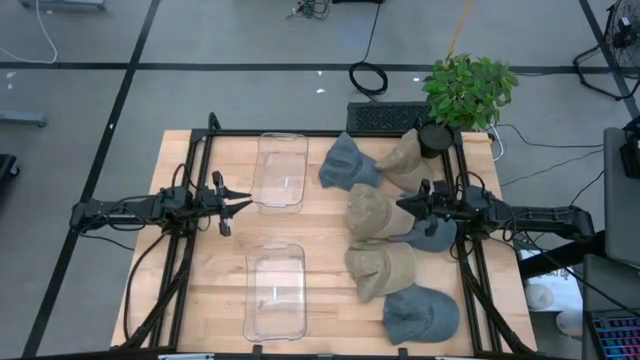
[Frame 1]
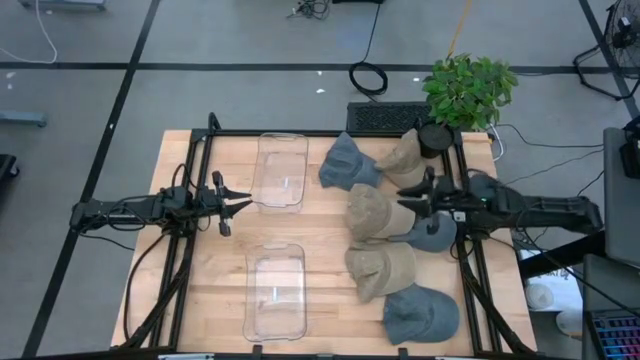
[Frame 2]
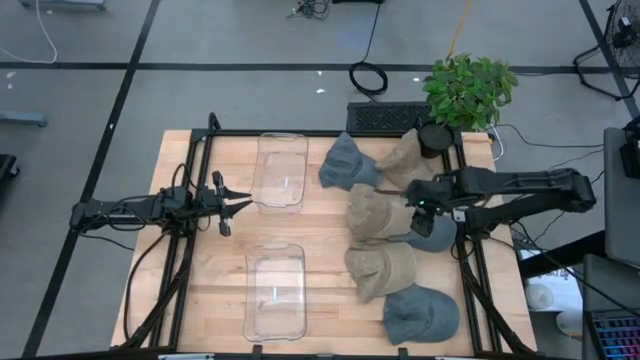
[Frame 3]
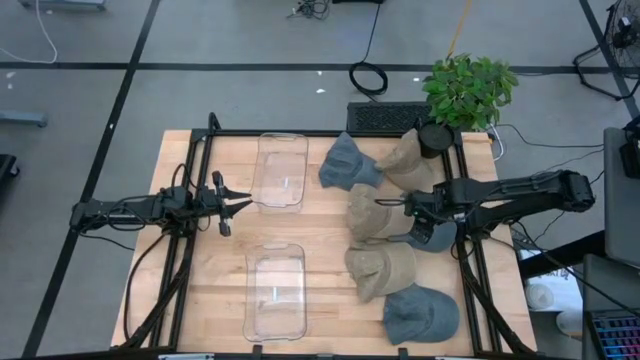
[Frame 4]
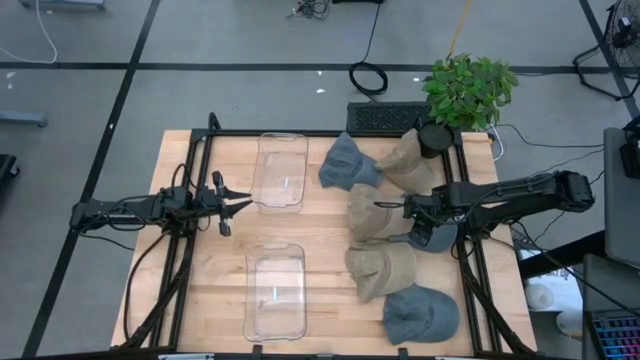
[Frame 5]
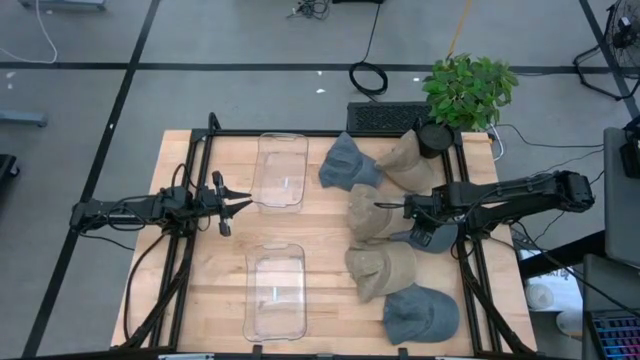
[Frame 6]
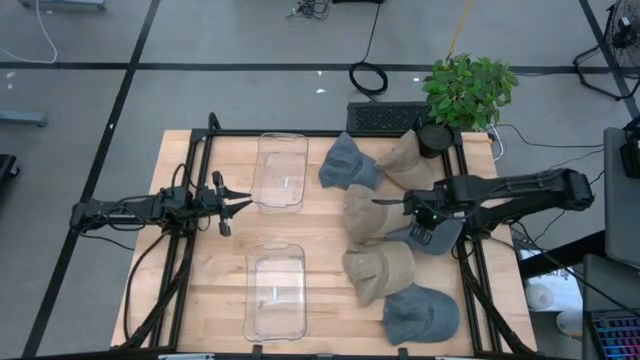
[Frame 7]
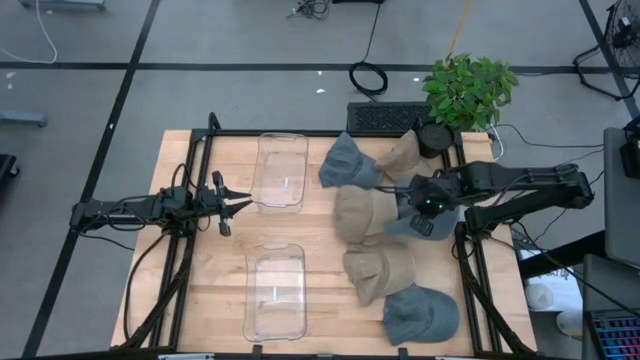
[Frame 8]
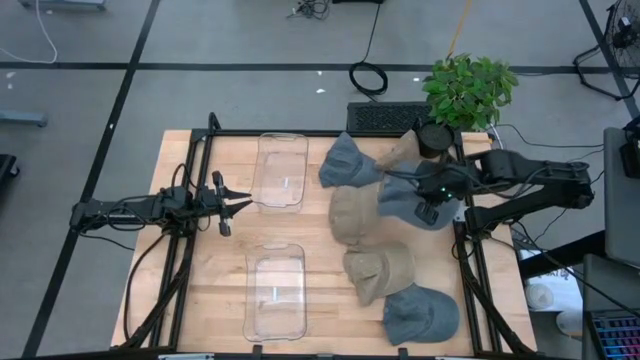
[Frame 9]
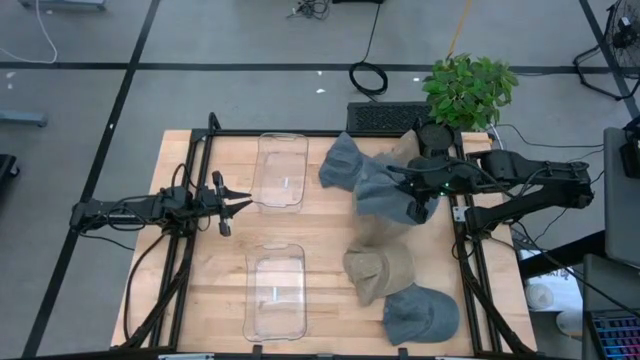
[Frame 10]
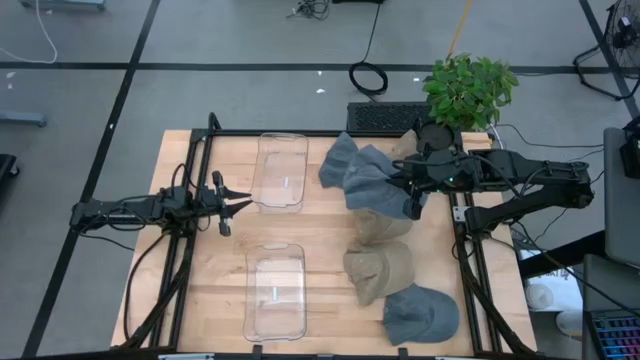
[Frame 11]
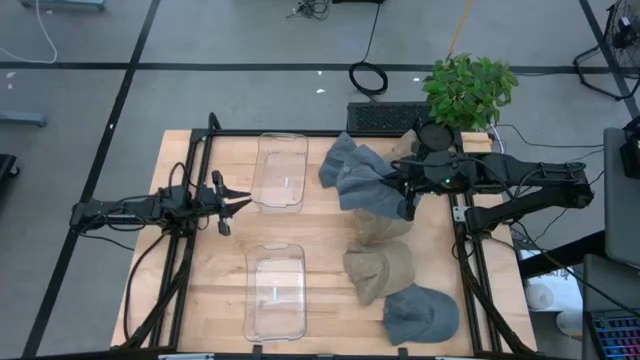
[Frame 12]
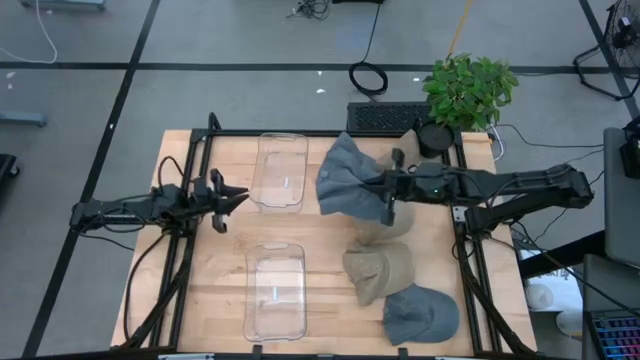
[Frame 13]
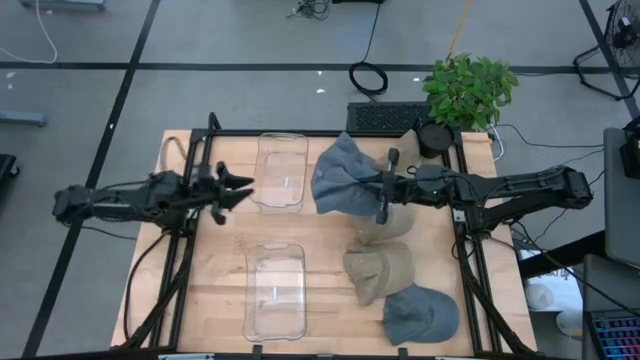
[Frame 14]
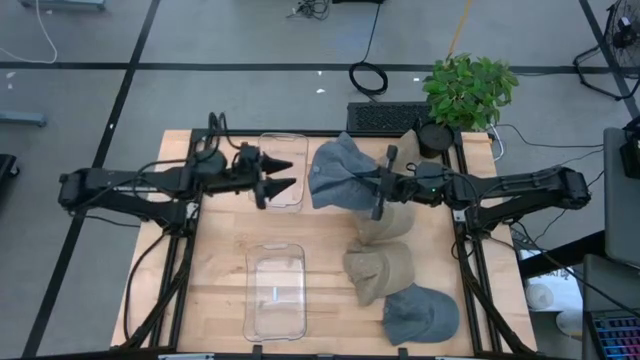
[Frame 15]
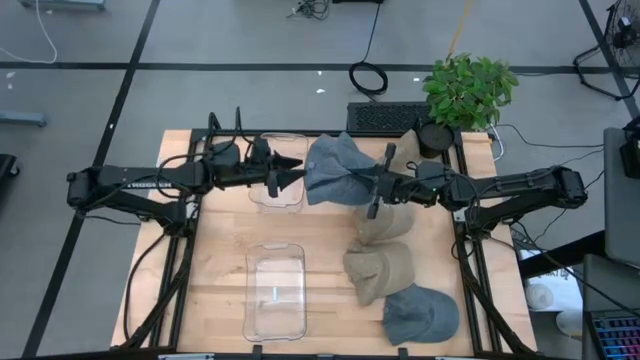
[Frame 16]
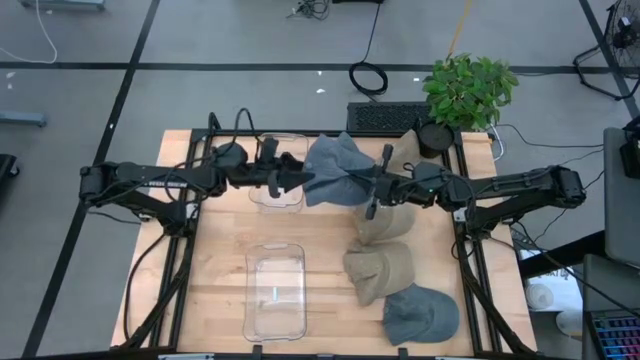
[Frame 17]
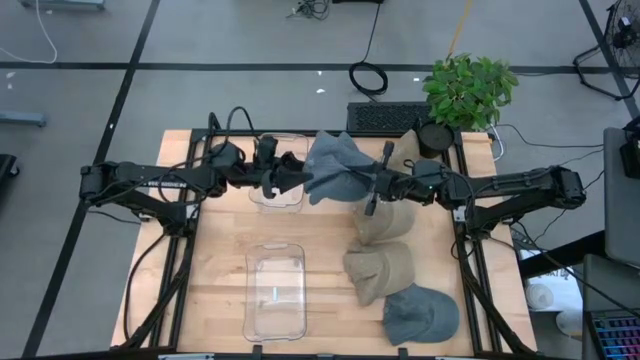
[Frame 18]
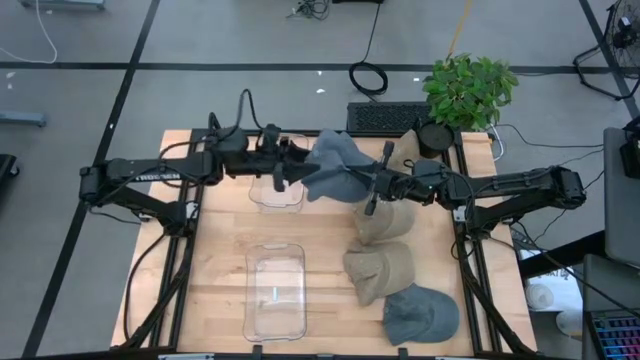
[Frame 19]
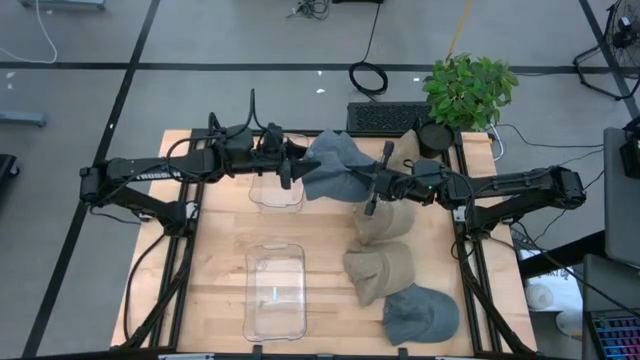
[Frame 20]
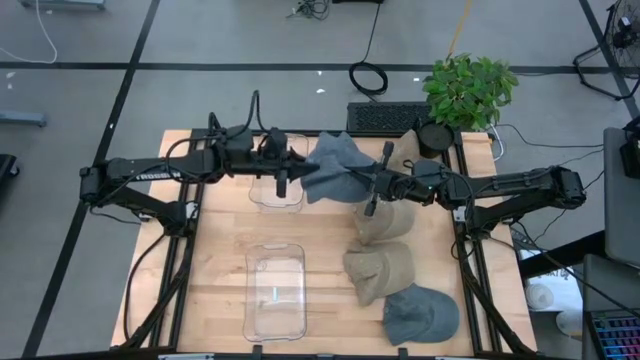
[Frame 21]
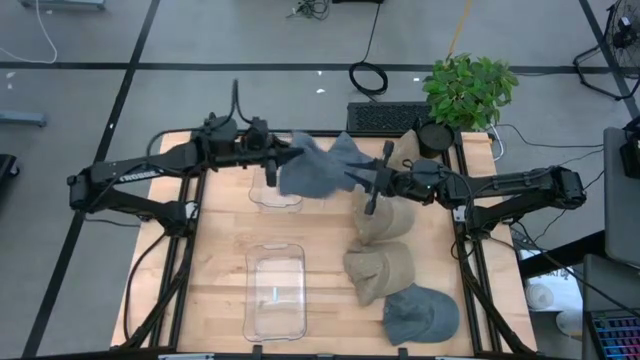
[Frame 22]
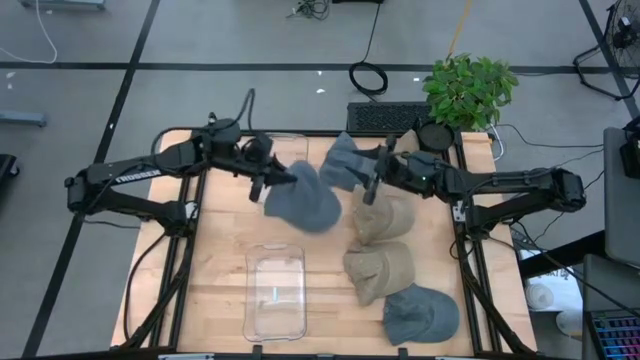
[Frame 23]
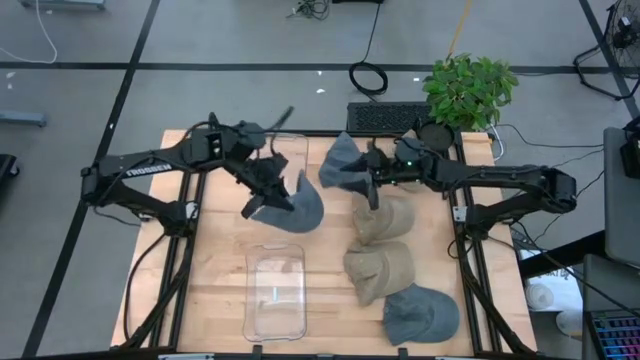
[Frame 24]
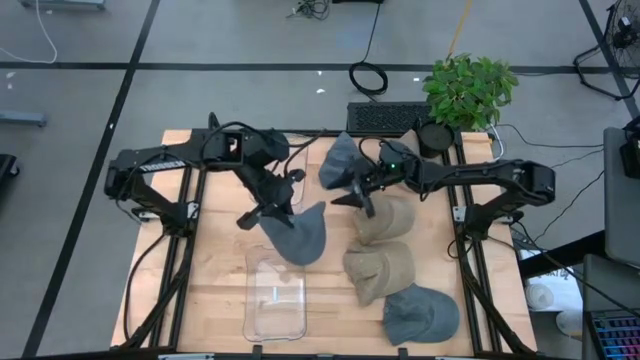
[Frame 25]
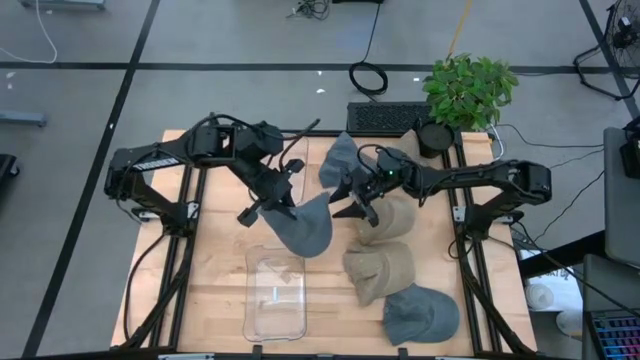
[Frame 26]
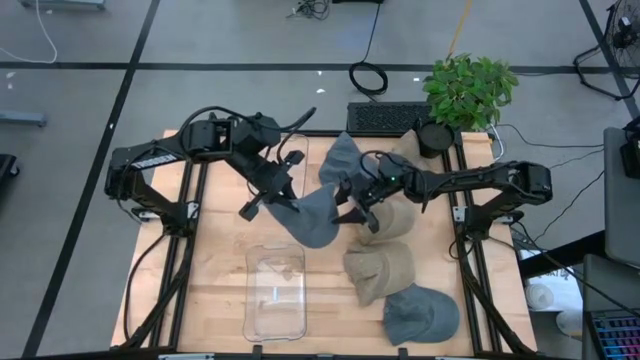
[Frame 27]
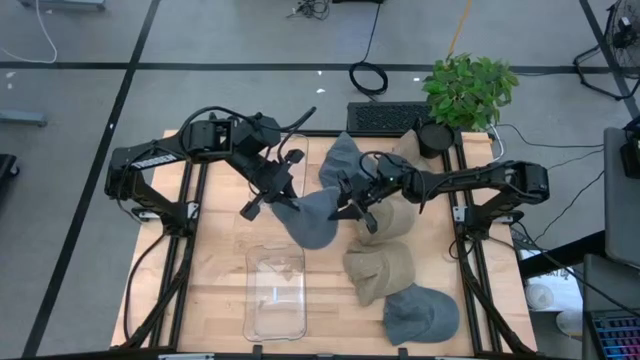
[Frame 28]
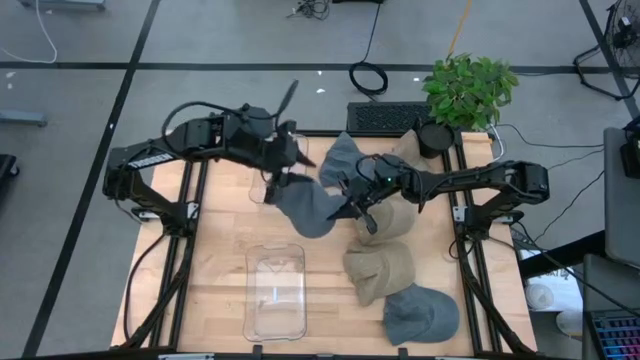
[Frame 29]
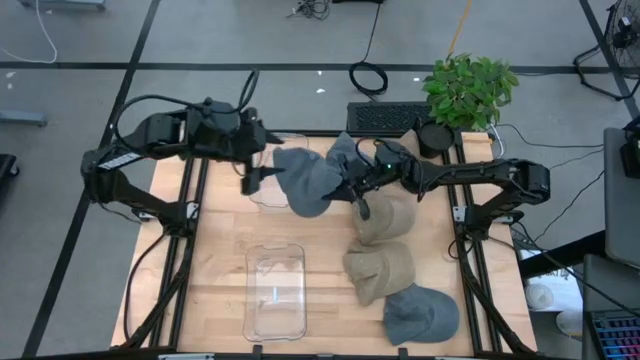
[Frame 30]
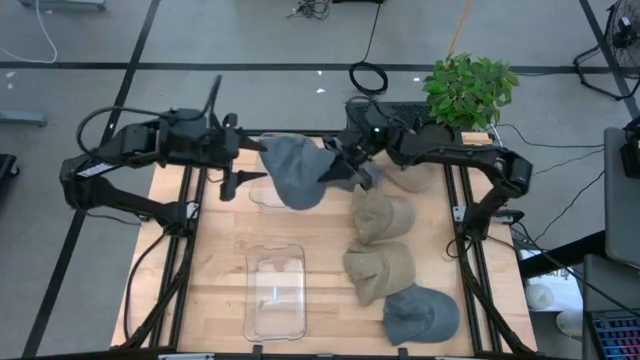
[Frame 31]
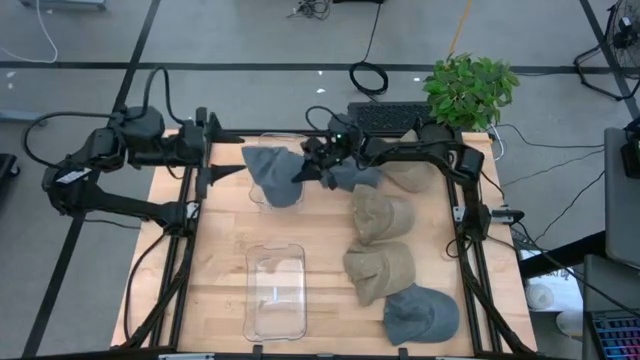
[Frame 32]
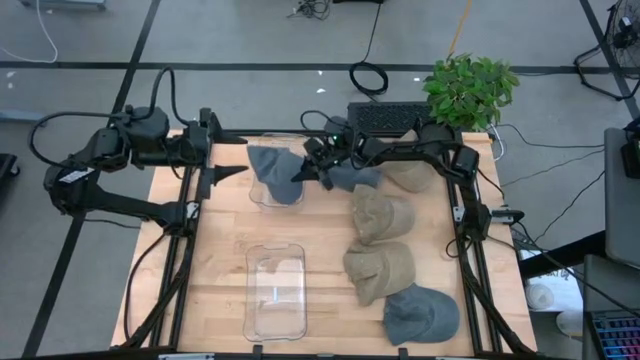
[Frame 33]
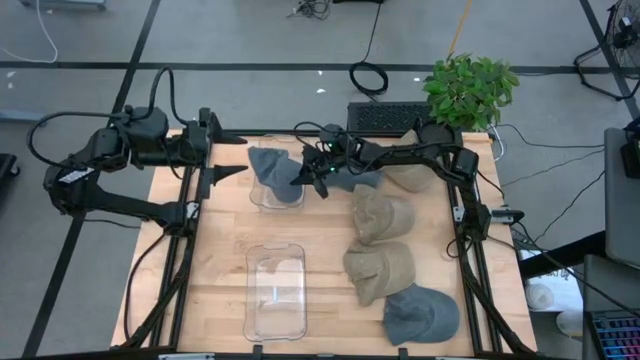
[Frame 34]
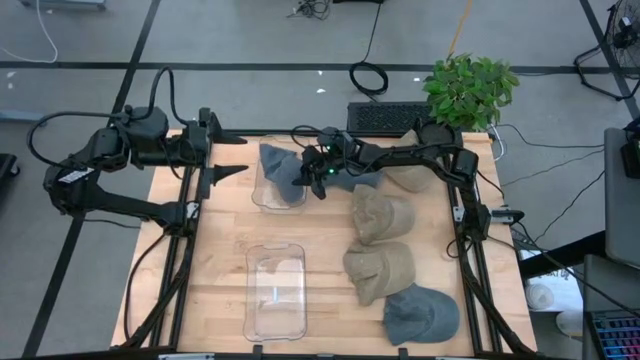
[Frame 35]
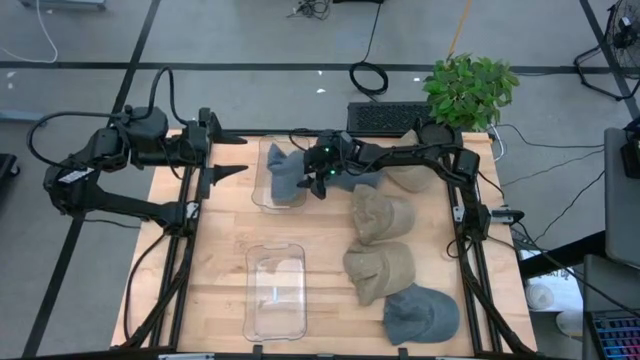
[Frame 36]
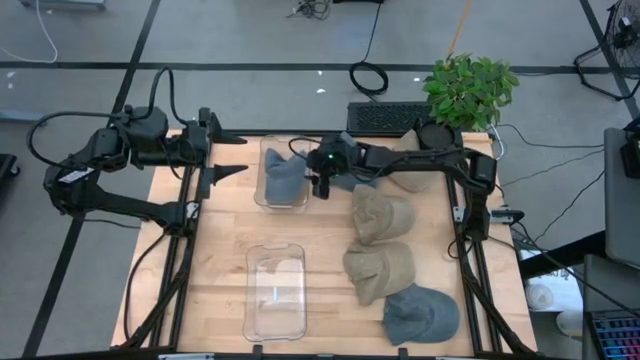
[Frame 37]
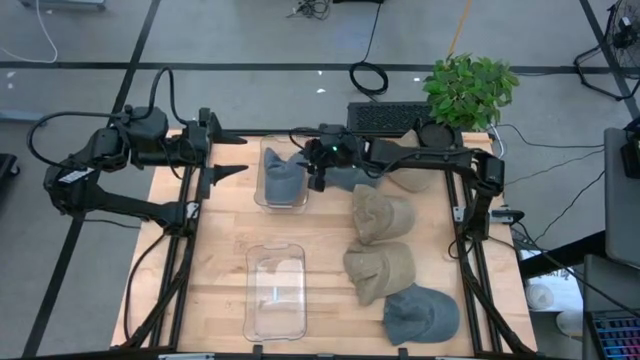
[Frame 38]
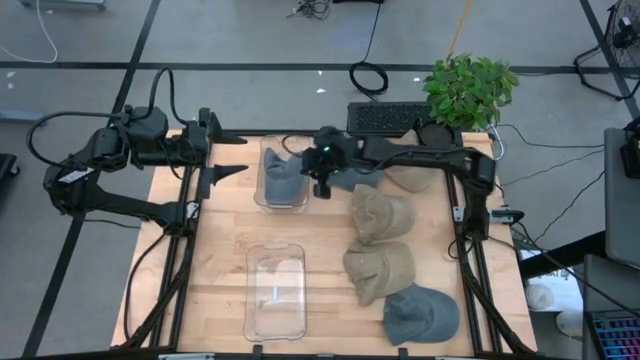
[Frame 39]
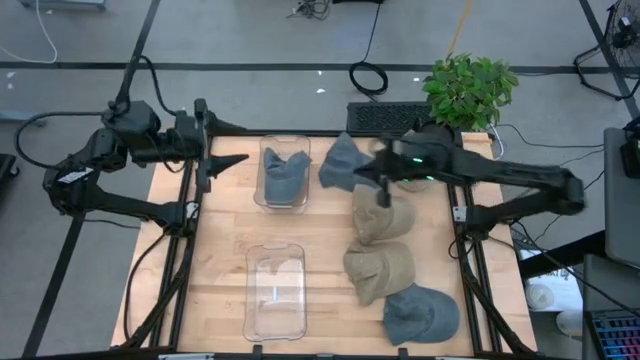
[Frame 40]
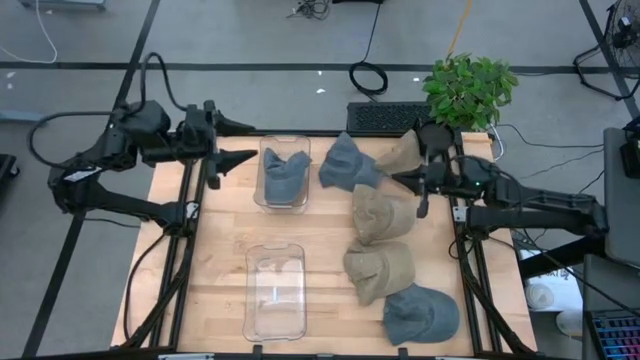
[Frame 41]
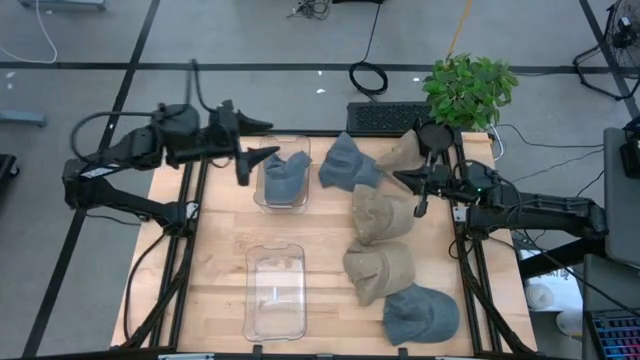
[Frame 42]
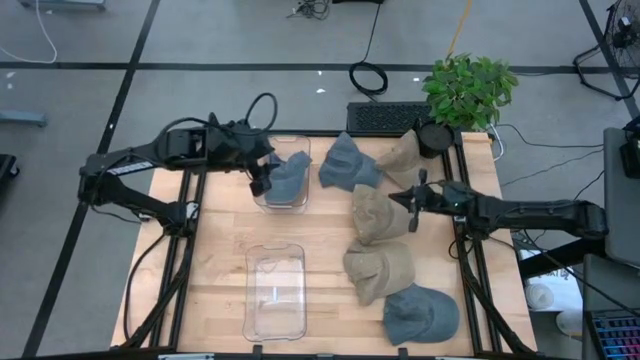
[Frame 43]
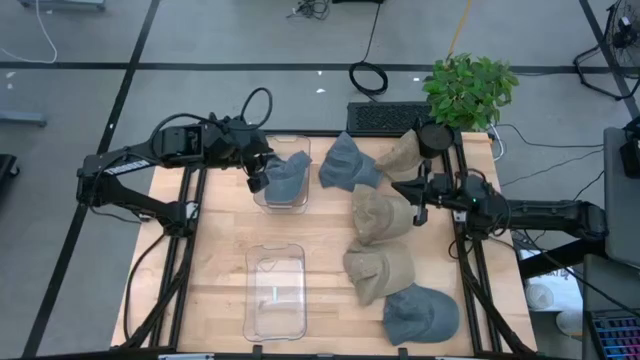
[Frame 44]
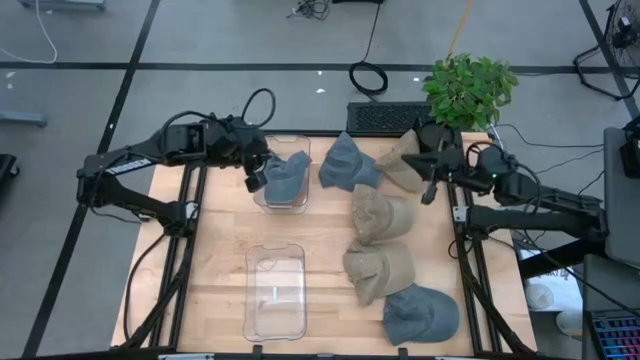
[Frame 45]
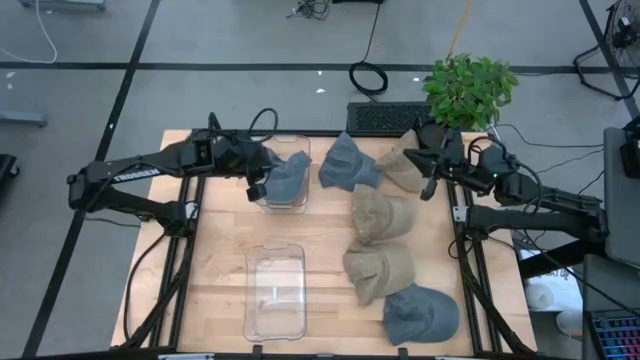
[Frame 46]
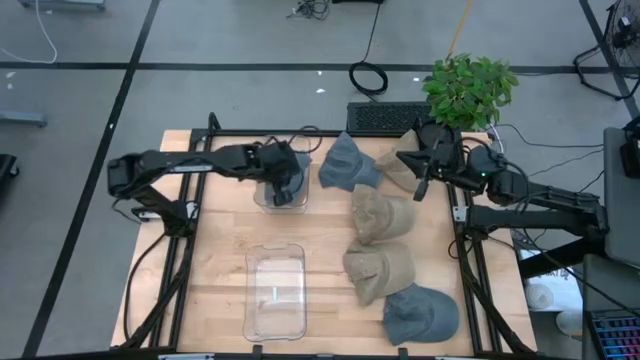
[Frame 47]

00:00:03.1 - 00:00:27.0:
Task: Stack caps by color
Put the top right blue cap into the top transparent bin
